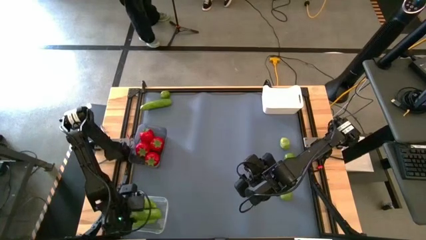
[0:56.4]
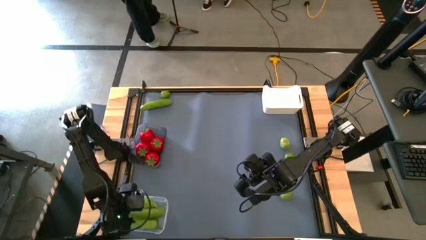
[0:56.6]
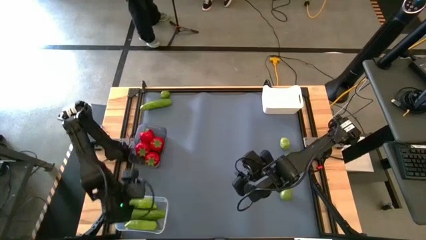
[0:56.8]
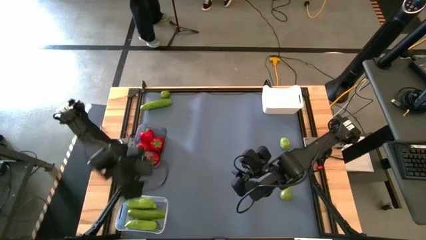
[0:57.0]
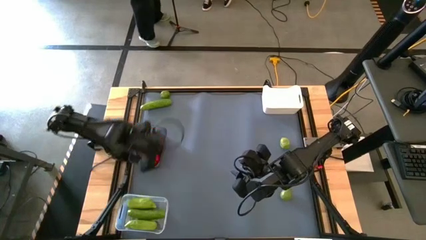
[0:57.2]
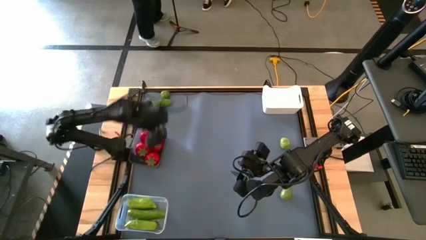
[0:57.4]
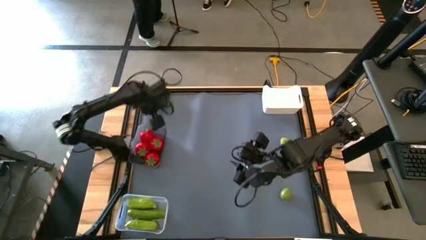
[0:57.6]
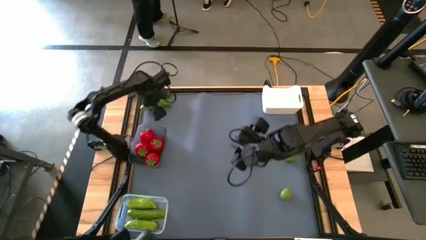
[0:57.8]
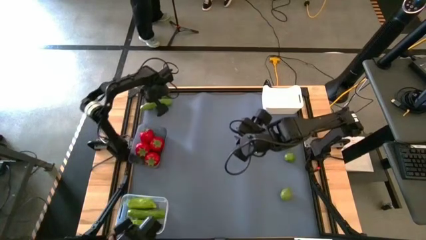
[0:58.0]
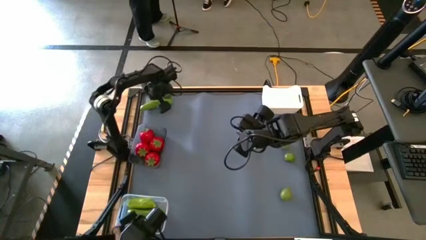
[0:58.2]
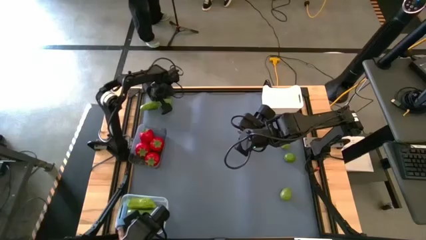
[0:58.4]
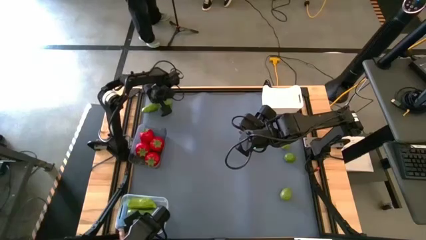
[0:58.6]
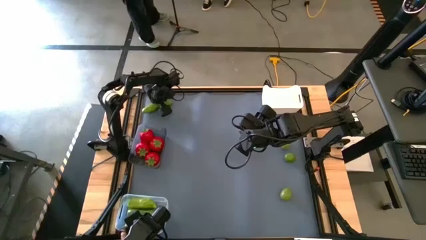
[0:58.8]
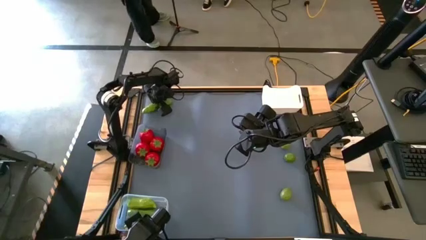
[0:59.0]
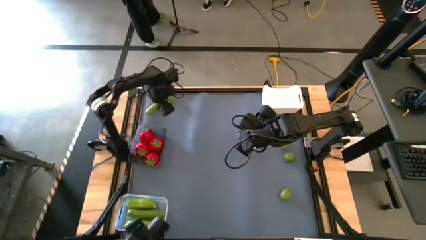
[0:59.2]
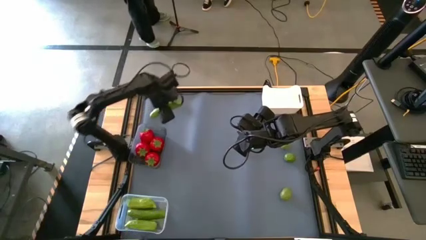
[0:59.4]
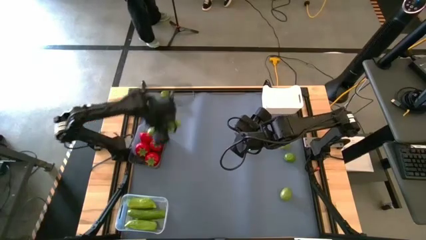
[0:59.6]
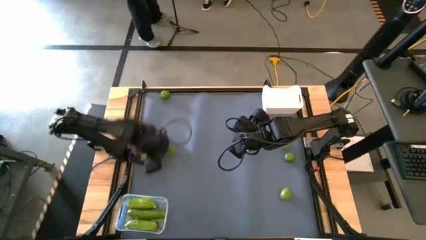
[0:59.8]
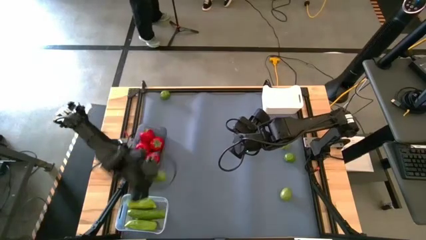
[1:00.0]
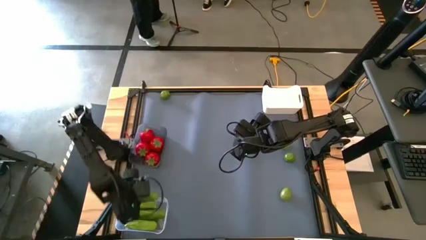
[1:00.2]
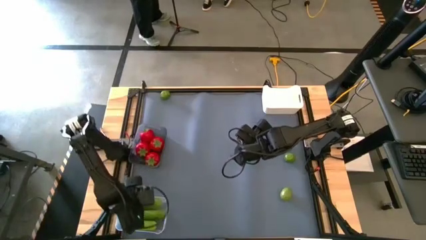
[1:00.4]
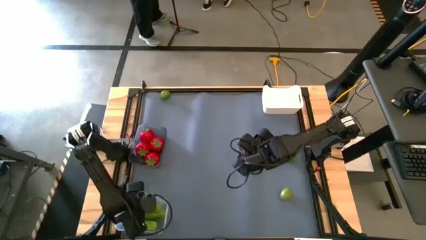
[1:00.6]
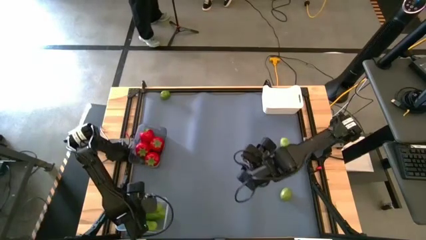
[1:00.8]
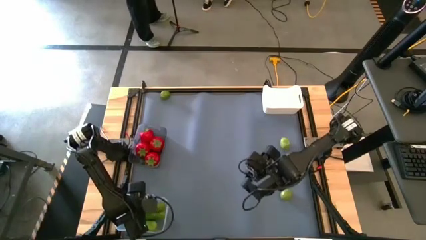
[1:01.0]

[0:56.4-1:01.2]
Task: Sort produce into baskets
Put the pickle into the transparent bin

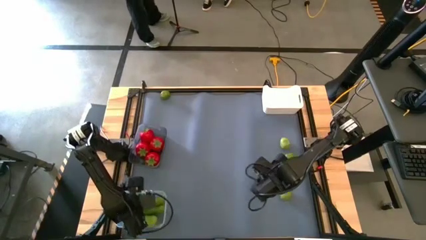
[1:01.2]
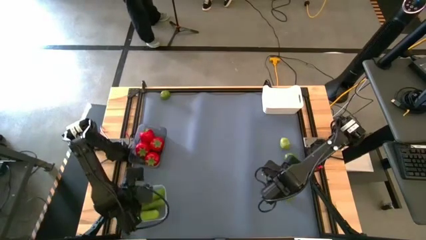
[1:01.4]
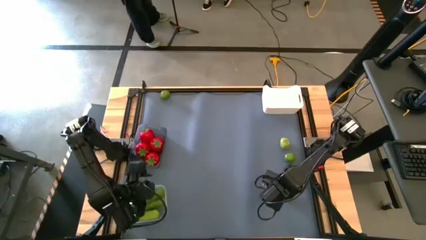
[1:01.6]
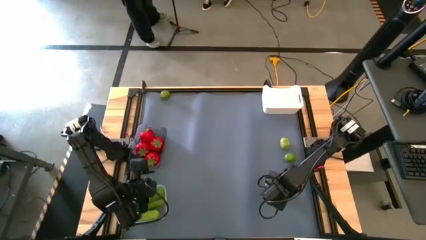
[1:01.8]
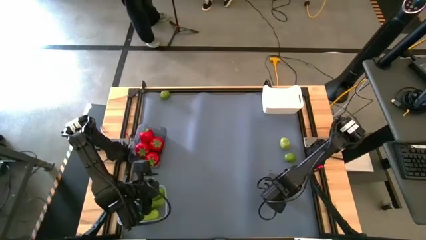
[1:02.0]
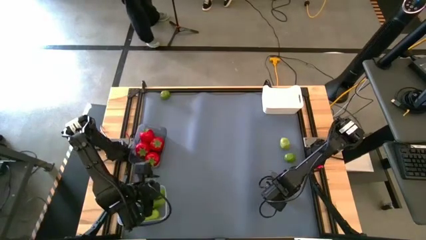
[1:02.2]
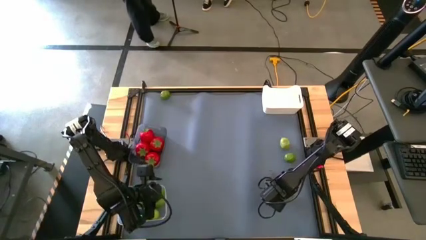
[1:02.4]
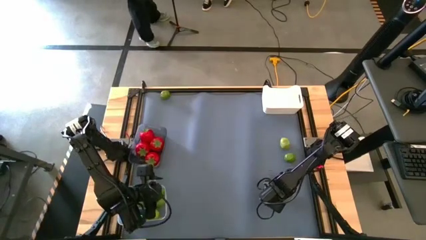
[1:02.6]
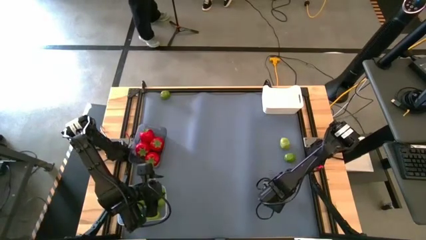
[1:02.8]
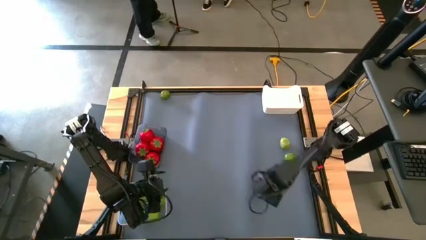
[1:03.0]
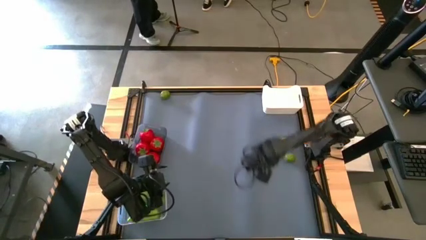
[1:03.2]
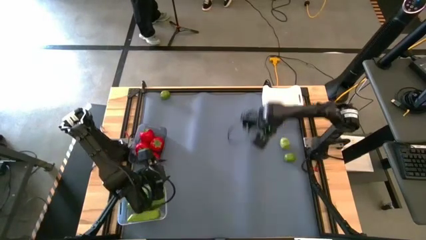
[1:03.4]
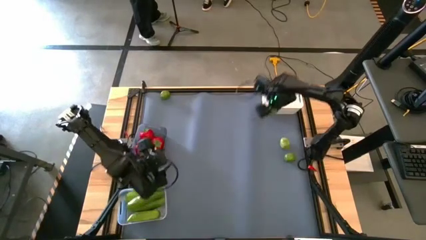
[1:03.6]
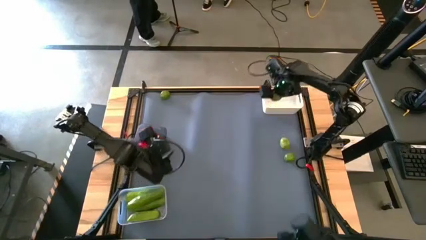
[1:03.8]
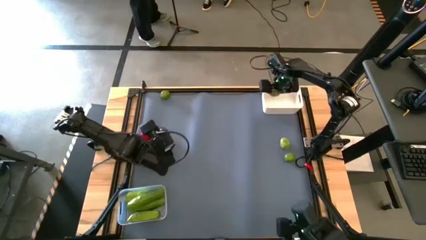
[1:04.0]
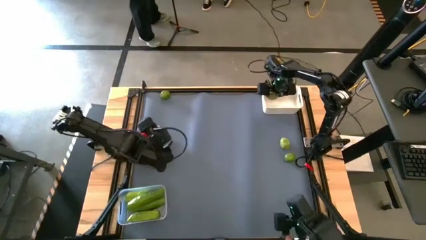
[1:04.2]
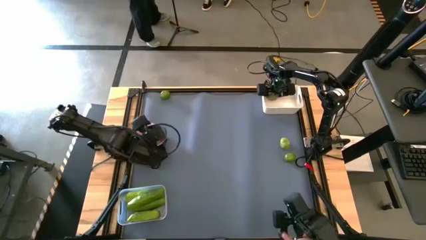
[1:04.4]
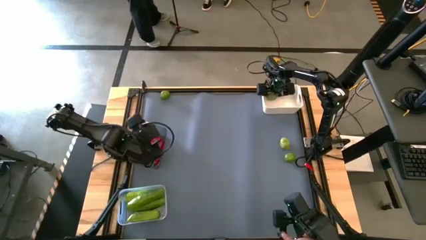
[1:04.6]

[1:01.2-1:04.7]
Put the bottom right lime into the white bin

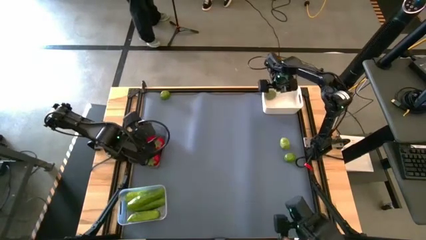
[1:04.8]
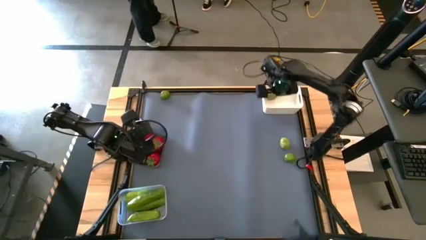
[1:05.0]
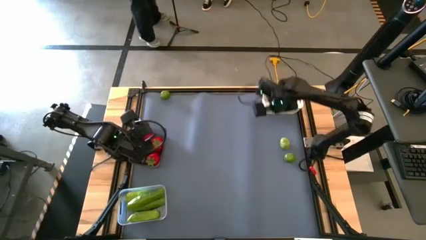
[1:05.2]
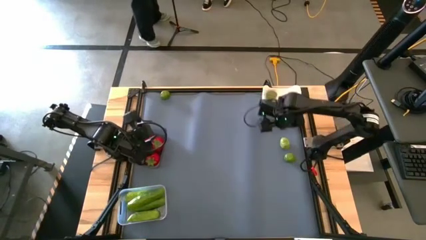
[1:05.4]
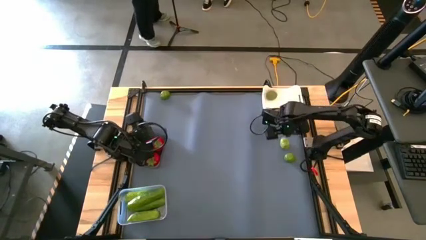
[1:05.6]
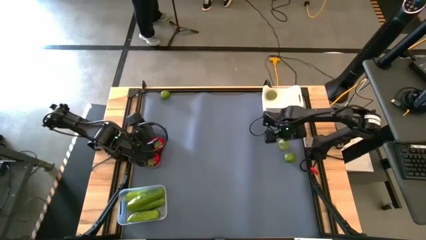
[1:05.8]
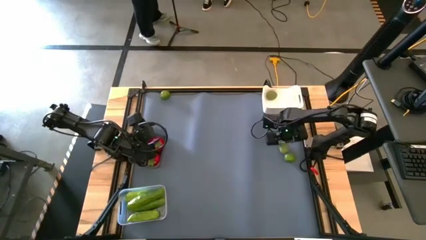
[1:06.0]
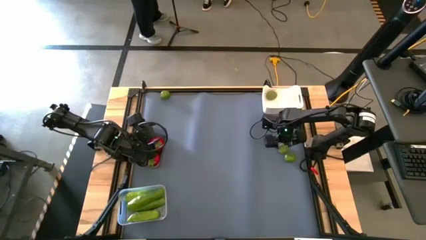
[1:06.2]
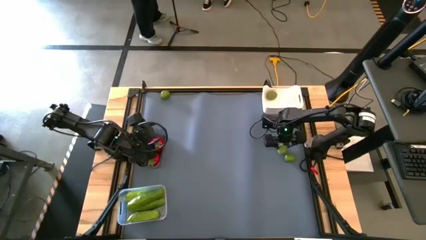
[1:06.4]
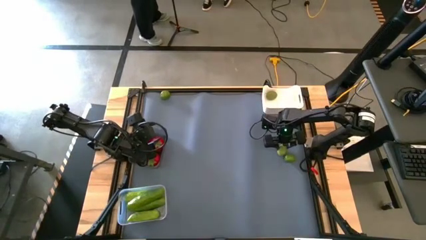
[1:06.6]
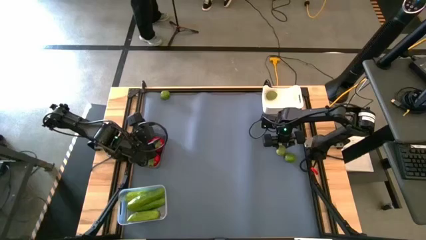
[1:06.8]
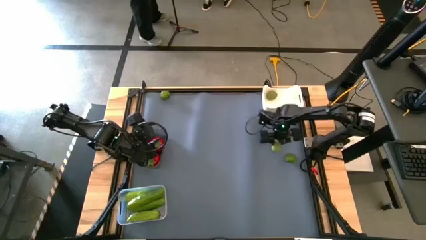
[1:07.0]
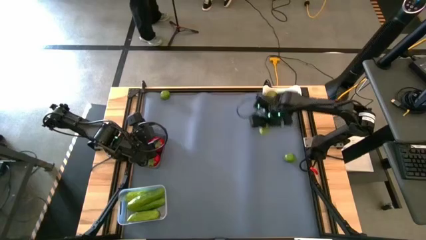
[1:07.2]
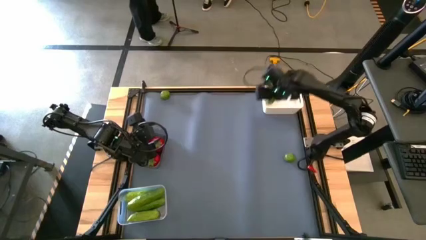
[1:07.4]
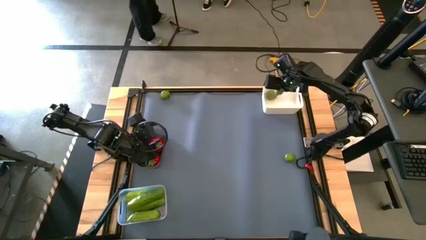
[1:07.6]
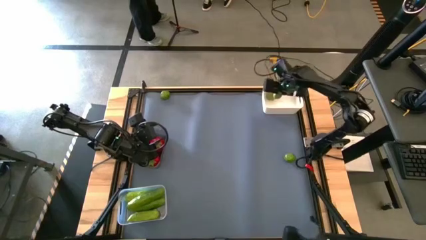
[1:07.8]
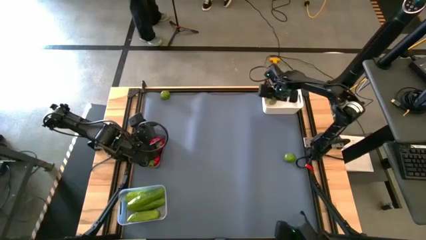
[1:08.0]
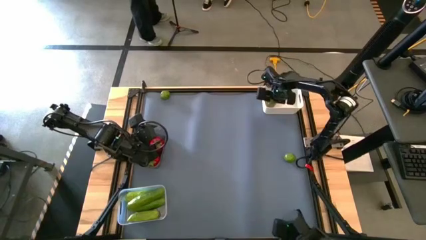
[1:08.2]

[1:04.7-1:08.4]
Put the middle right lime into the white bin

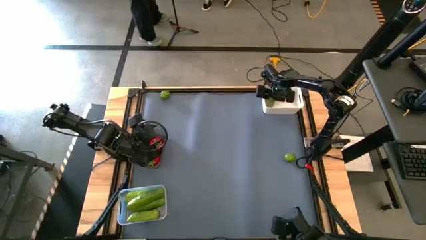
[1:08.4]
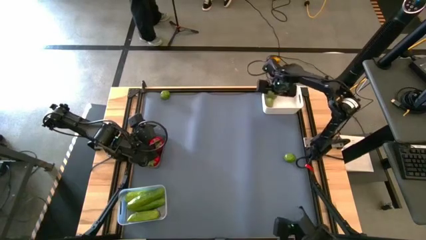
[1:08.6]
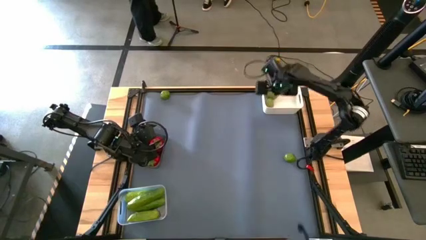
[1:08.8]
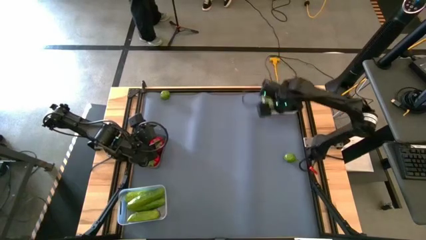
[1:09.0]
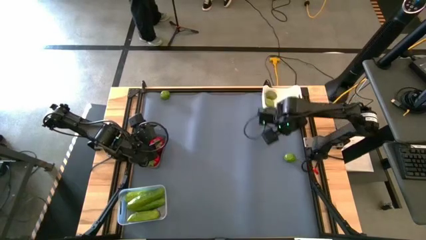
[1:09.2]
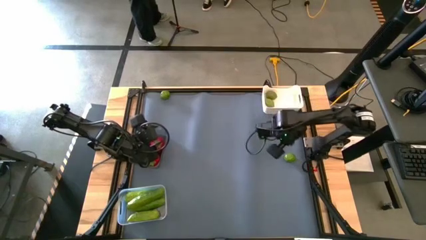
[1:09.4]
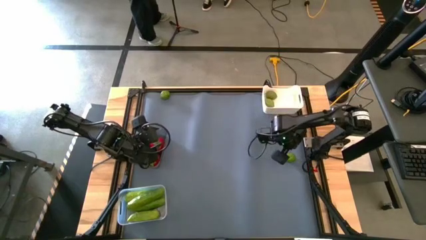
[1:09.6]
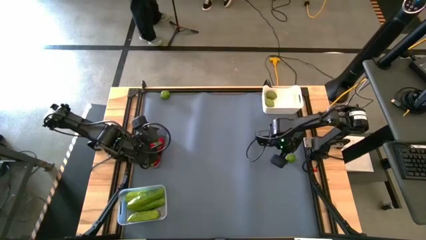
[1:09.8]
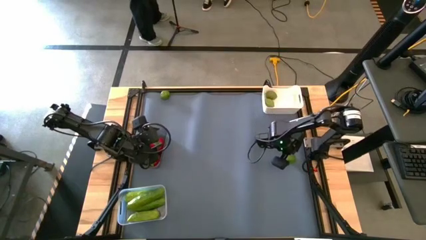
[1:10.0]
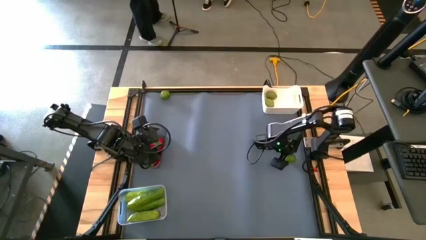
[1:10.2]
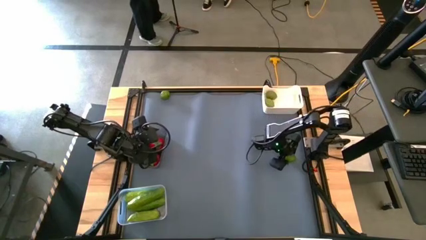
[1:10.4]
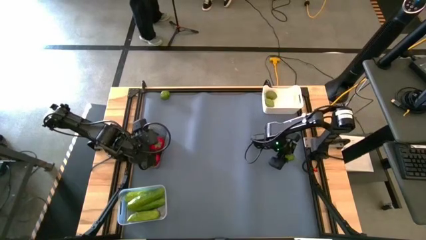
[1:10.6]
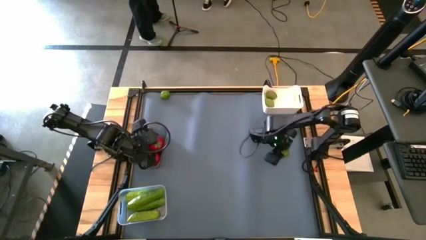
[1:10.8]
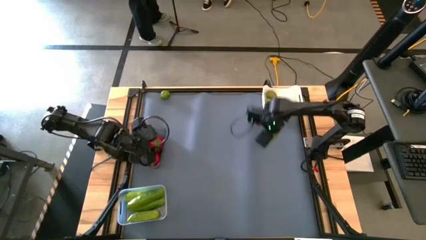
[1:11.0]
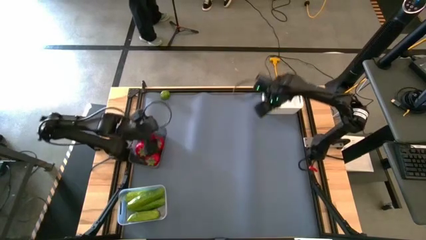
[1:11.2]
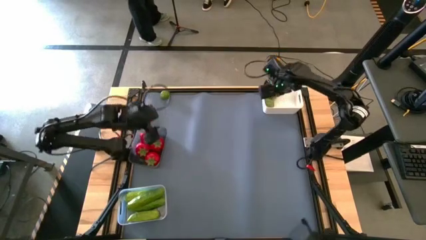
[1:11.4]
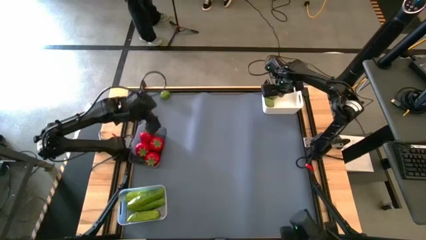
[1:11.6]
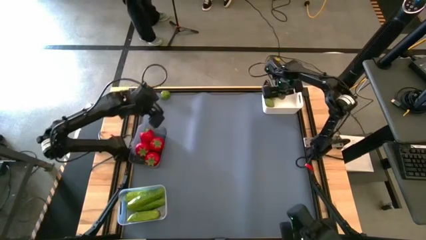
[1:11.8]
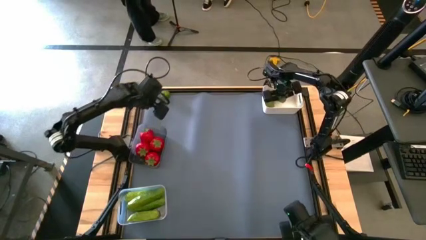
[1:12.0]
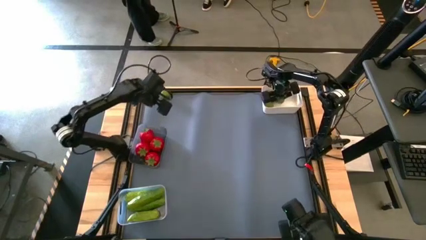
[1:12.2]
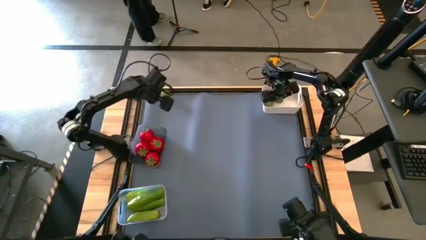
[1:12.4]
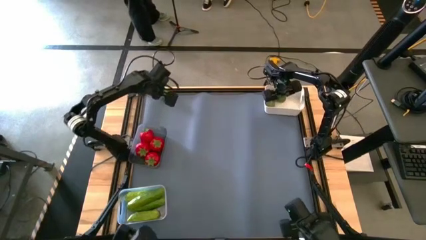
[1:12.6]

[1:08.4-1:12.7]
Put the right lime into the white bin
